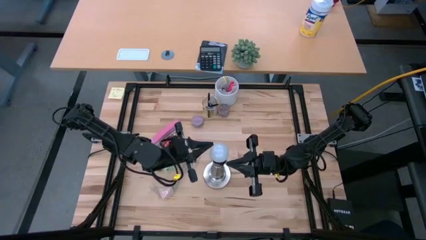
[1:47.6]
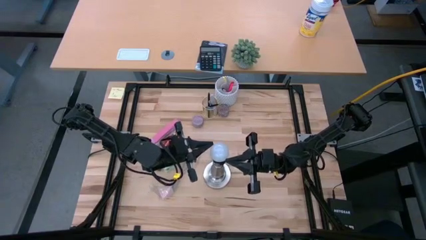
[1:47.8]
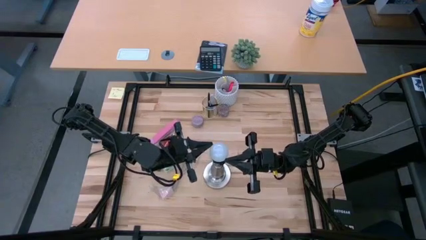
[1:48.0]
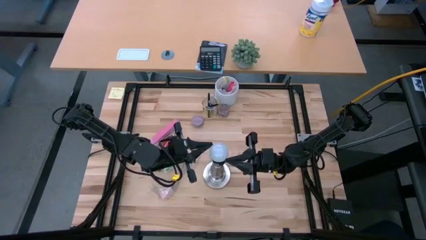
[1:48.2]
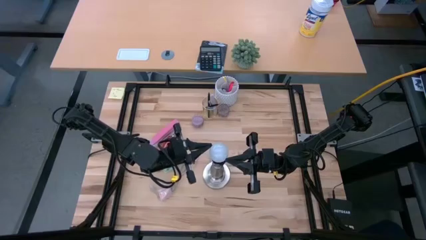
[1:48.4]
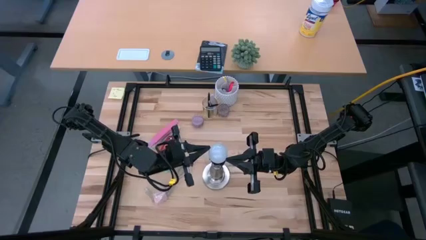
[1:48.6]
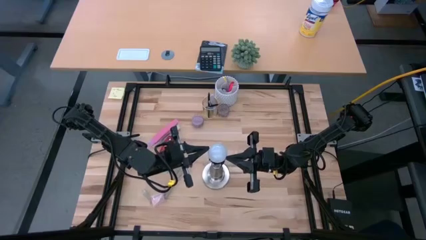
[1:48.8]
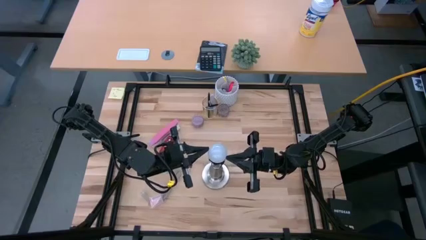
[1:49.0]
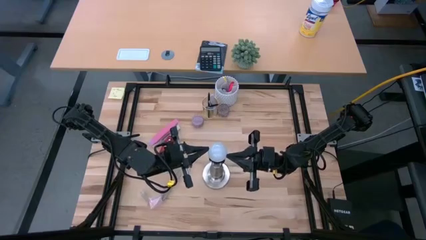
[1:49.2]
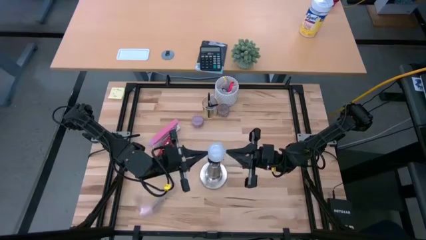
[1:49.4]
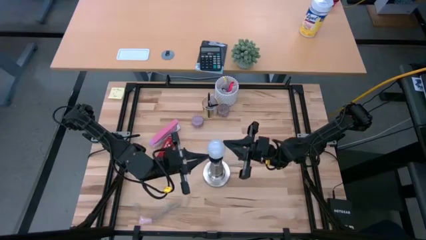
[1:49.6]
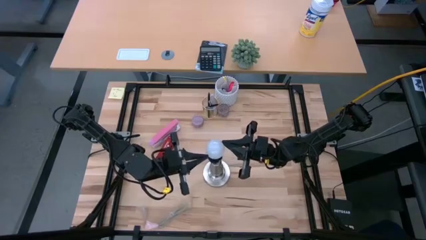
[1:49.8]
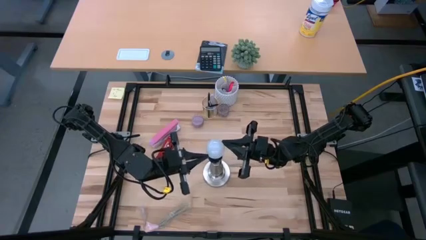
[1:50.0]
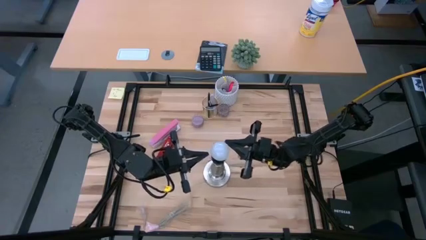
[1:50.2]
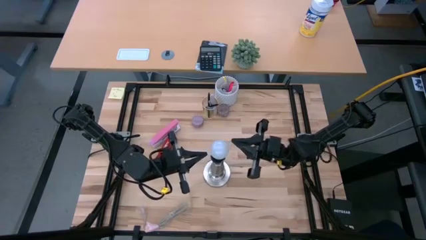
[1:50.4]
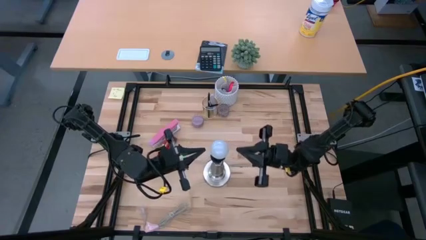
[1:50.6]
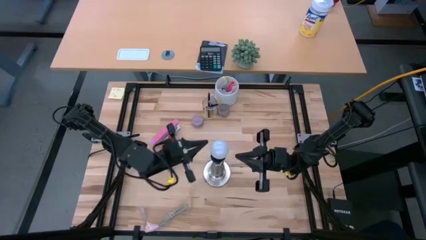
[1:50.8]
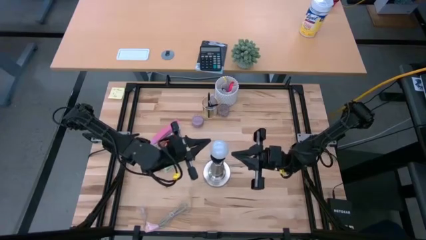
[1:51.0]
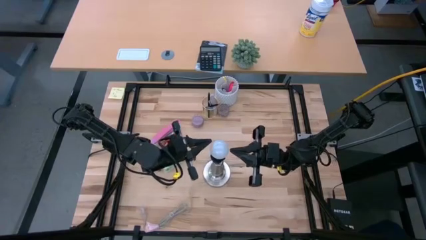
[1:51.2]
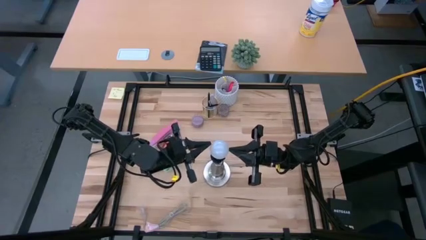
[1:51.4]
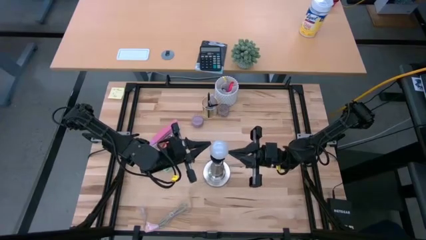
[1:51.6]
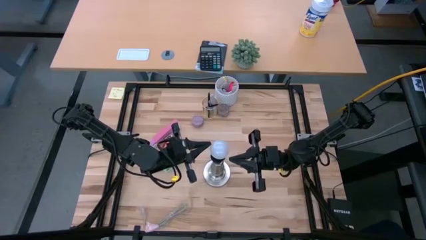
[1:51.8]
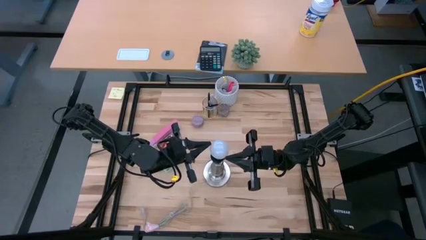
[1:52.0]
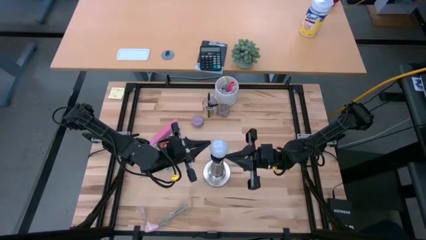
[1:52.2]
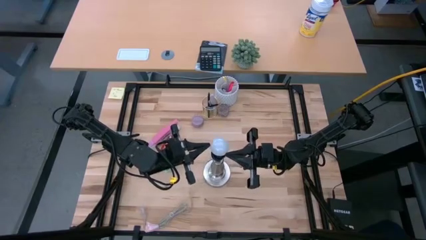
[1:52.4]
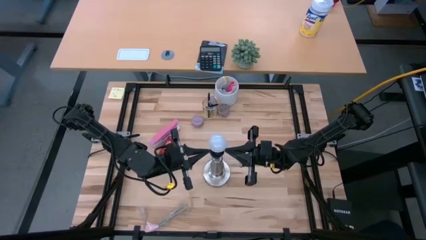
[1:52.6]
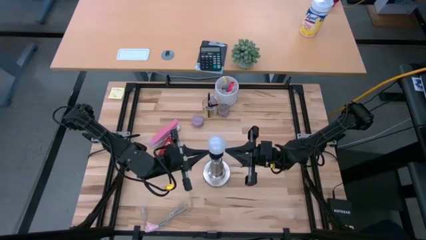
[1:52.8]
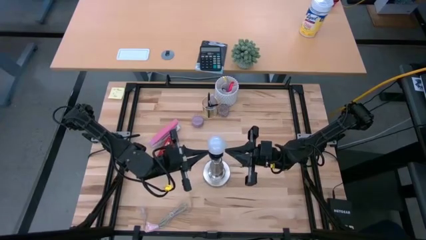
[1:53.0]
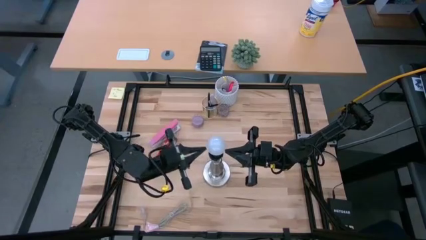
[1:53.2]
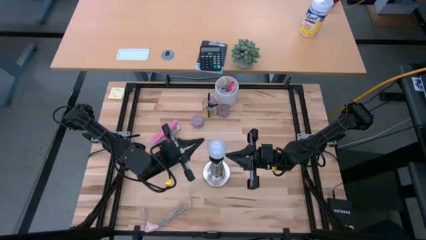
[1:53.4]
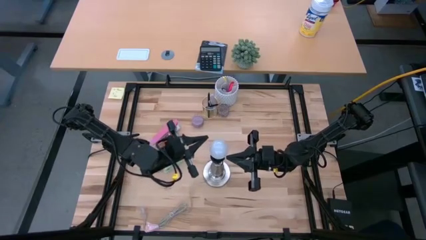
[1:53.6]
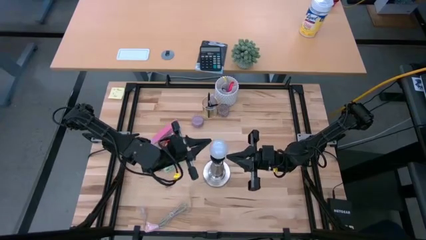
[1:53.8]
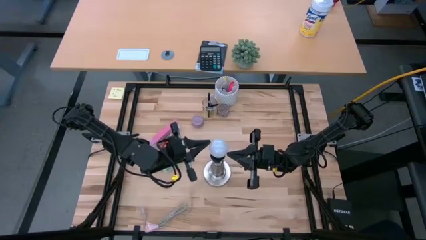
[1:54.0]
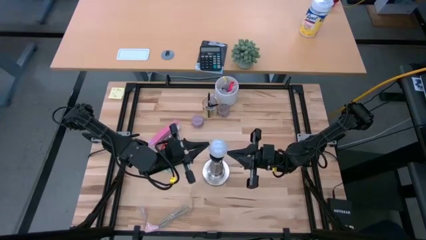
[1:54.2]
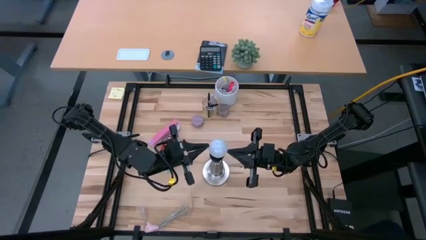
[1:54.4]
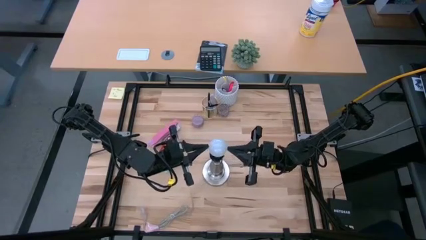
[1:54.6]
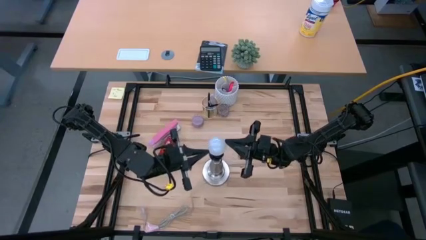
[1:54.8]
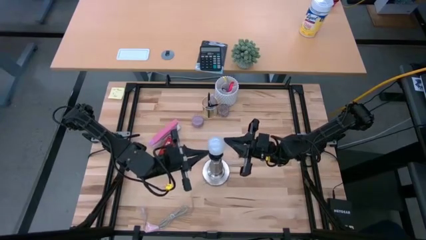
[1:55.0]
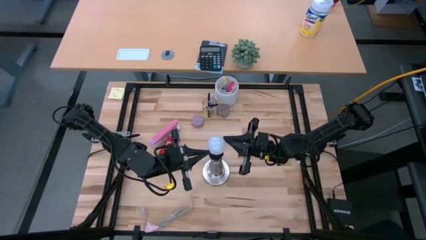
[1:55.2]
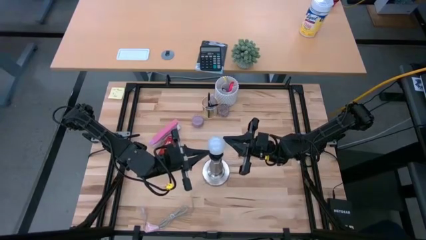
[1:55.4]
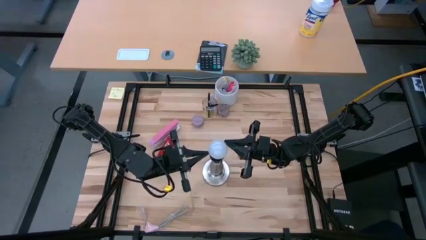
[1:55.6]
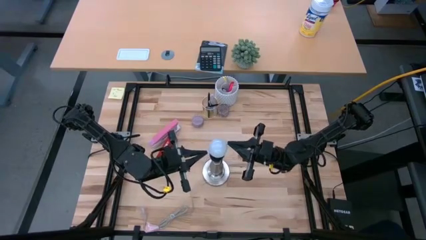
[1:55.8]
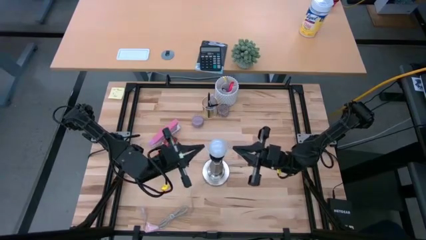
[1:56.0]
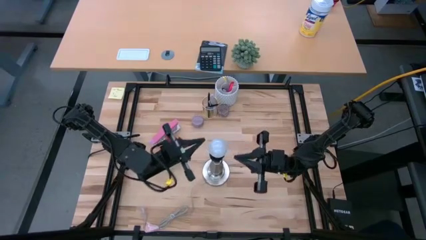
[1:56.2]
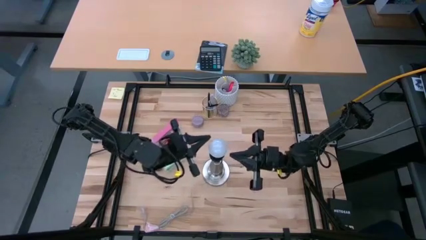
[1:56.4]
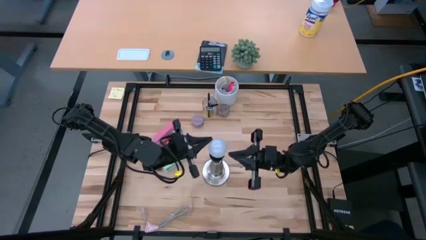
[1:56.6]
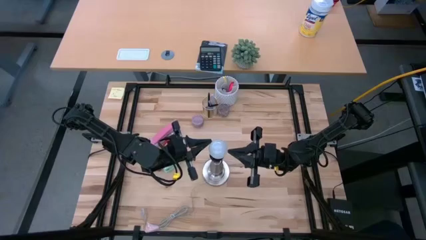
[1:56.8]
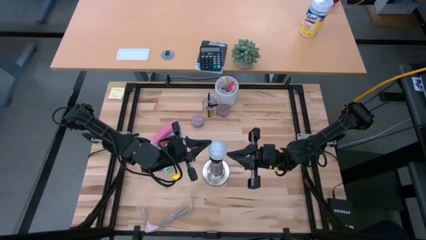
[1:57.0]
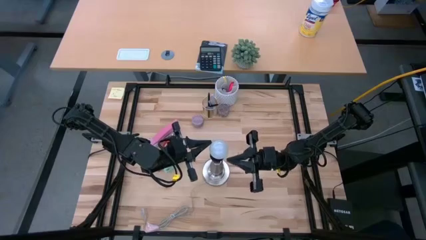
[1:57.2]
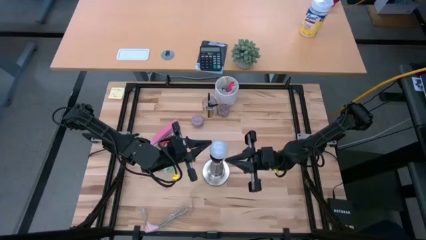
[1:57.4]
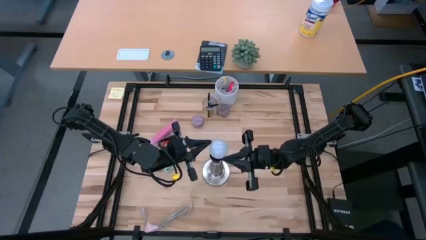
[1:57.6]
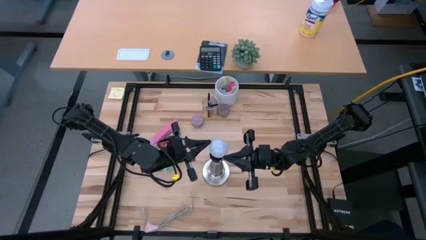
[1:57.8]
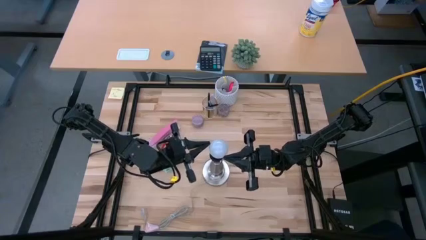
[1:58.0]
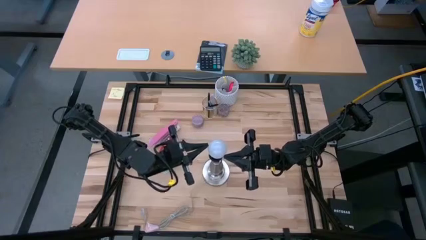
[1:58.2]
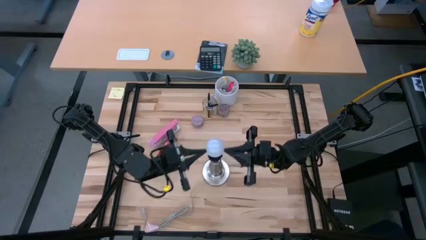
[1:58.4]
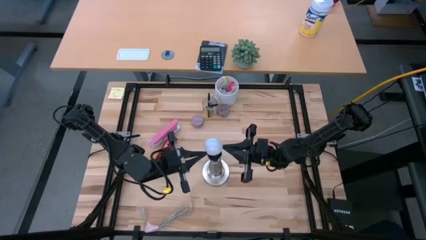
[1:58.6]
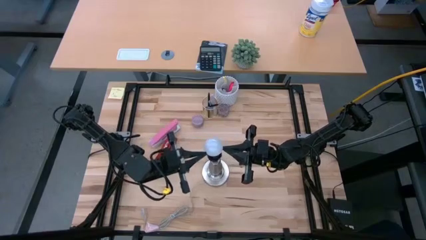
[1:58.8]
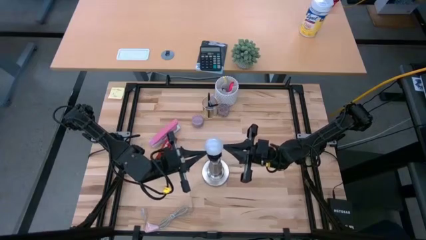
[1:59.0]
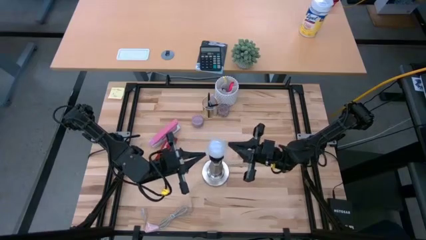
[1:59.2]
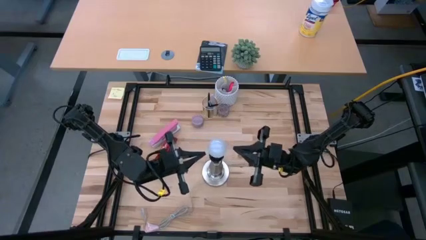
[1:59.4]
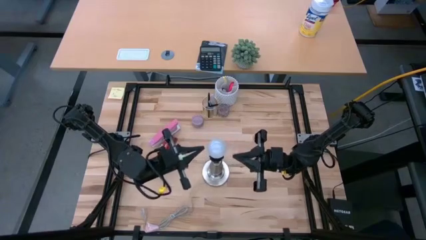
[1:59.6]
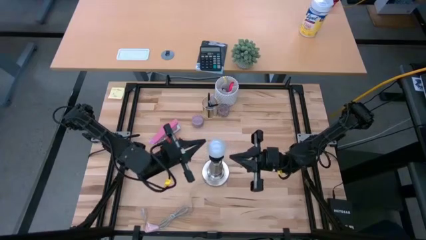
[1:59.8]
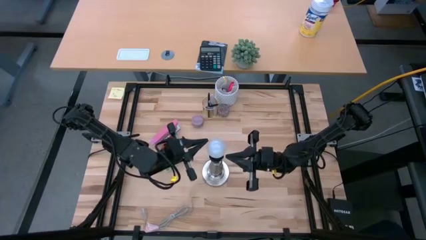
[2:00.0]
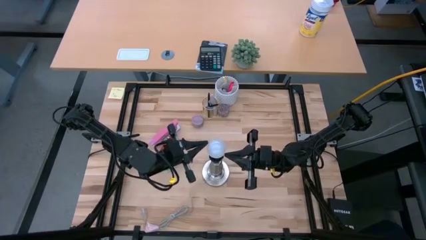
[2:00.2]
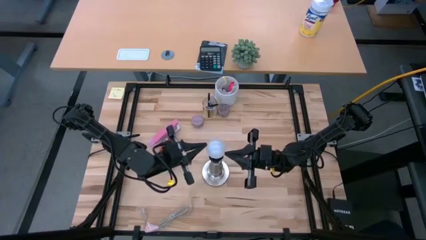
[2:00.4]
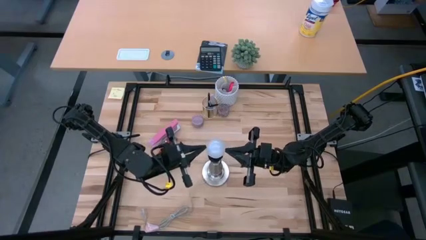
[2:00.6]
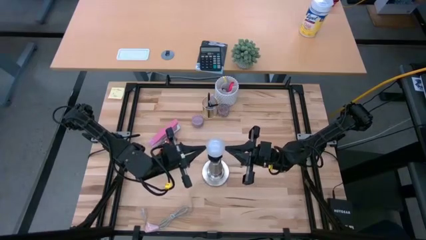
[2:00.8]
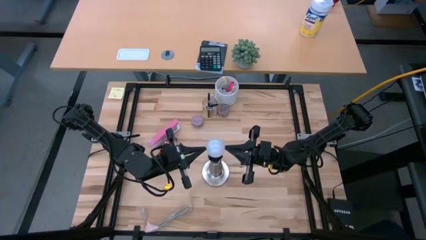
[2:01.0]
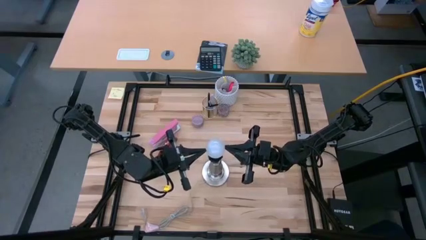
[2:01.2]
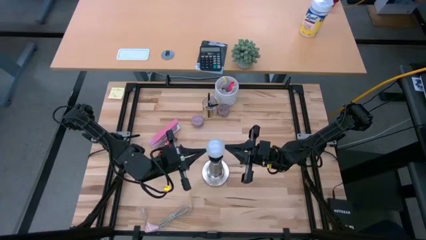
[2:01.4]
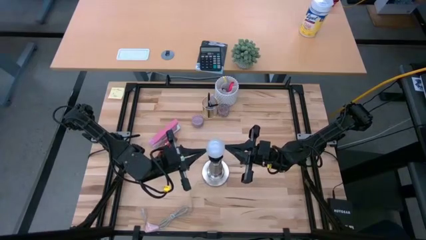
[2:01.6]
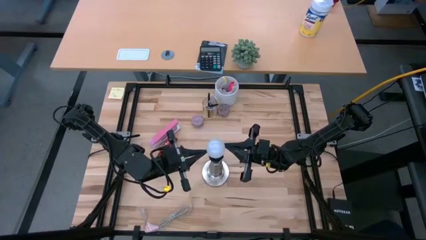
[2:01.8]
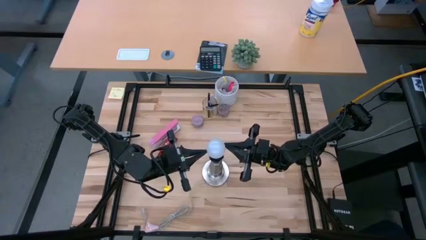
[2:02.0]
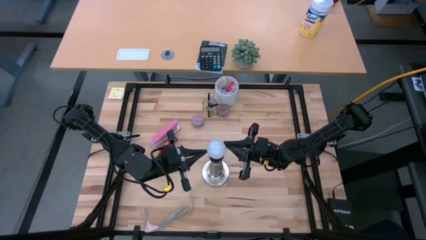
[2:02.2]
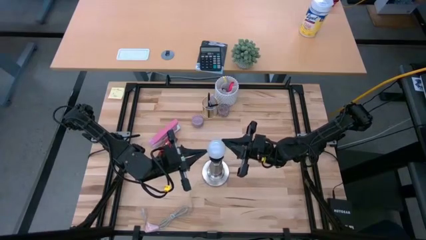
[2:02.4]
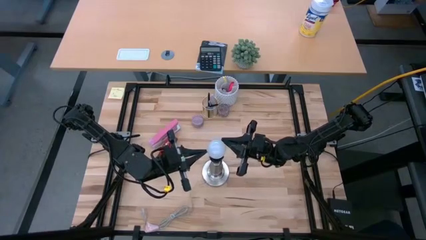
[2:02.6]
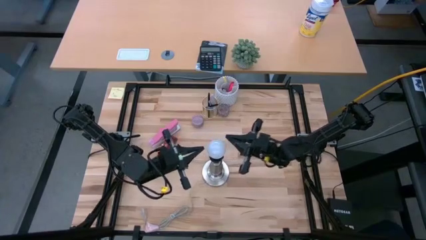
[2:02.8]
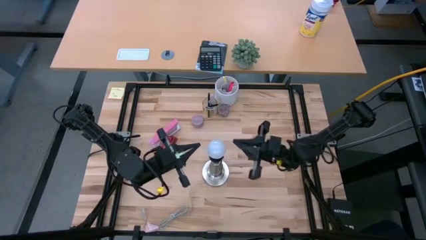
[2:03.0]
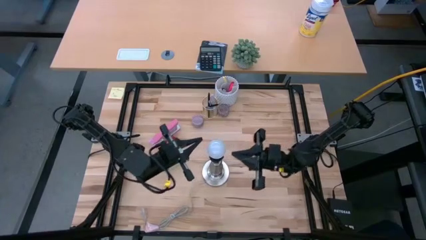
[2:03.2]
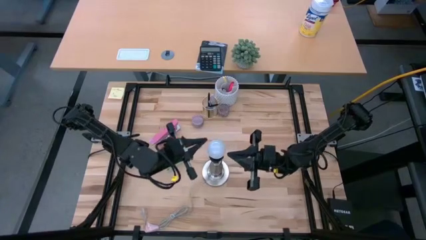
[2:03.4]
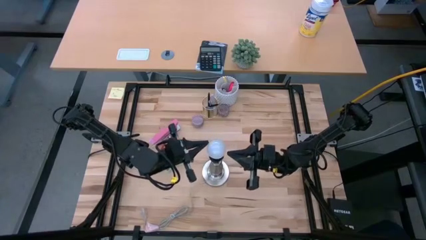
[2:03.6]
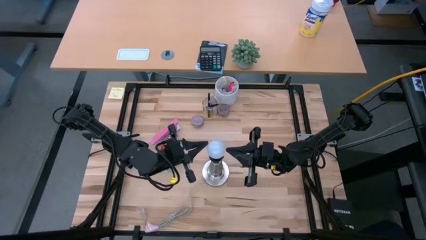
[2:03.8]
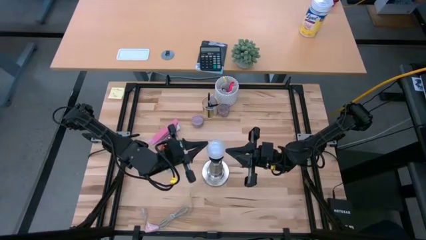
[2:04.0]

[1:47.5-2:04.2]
Task: Screw lightbulb
Remove the lightbulb from the lamp
